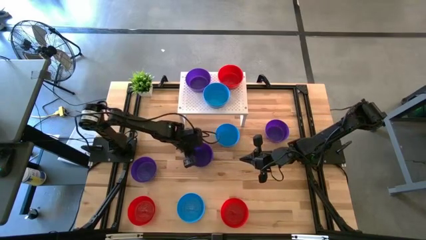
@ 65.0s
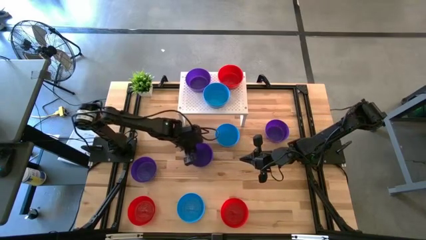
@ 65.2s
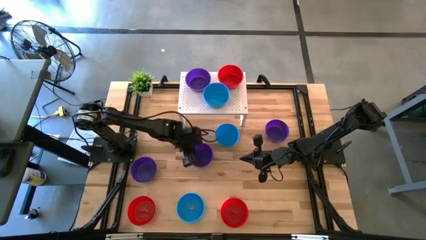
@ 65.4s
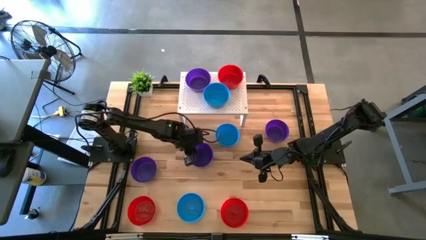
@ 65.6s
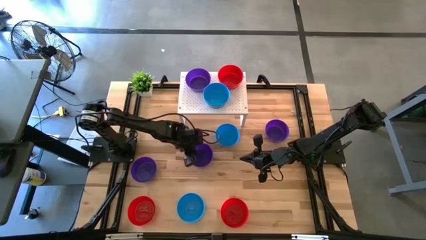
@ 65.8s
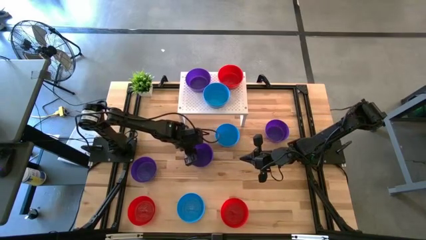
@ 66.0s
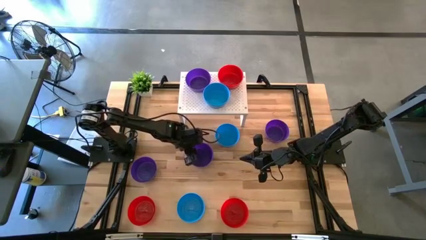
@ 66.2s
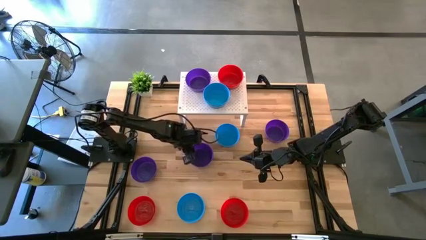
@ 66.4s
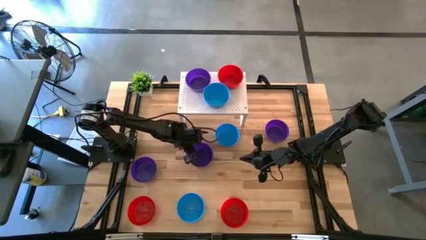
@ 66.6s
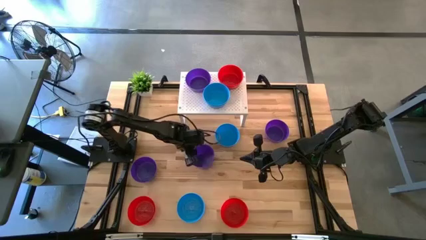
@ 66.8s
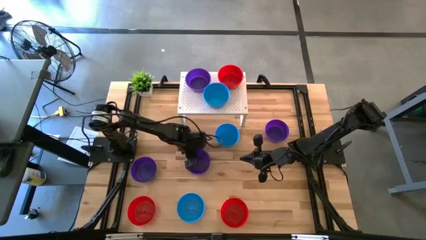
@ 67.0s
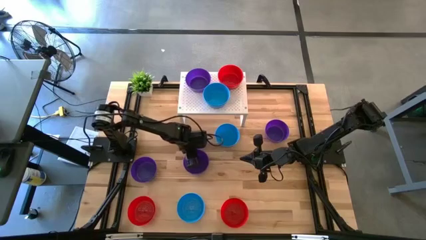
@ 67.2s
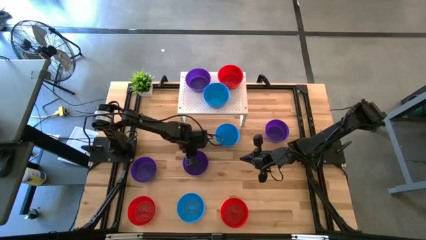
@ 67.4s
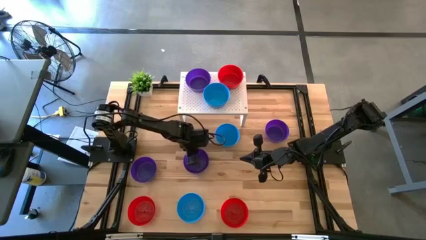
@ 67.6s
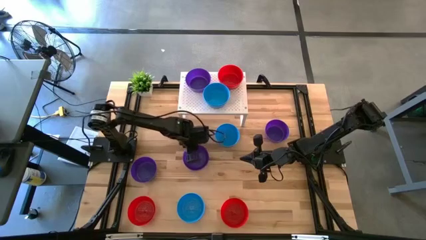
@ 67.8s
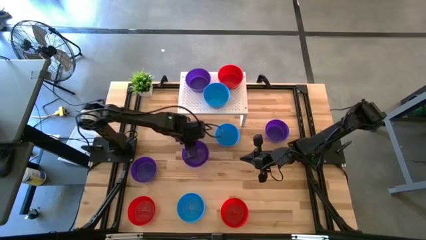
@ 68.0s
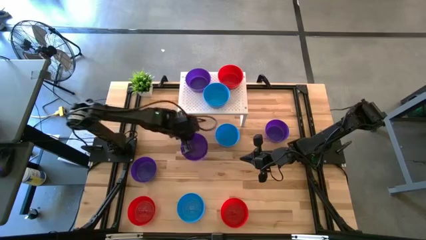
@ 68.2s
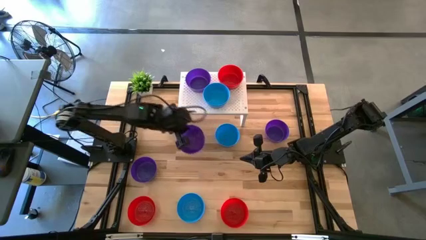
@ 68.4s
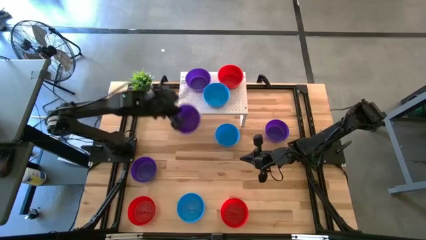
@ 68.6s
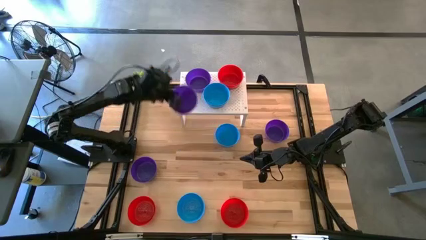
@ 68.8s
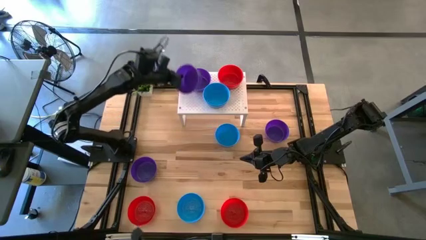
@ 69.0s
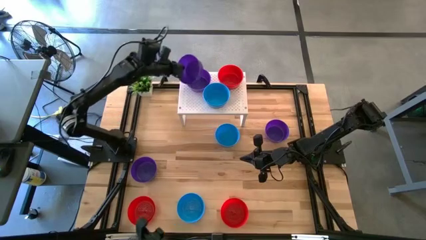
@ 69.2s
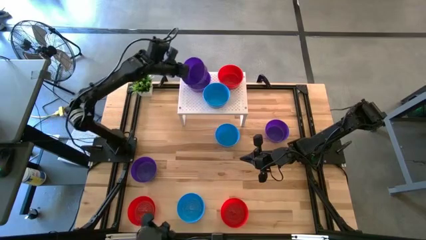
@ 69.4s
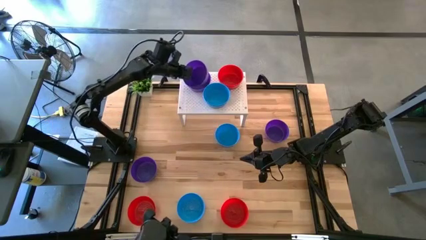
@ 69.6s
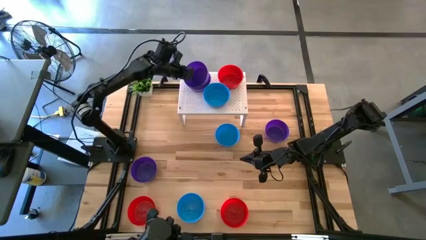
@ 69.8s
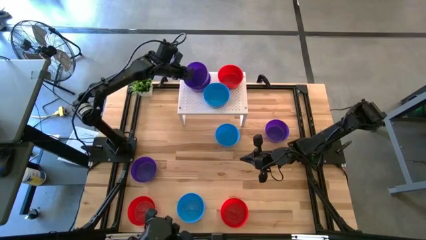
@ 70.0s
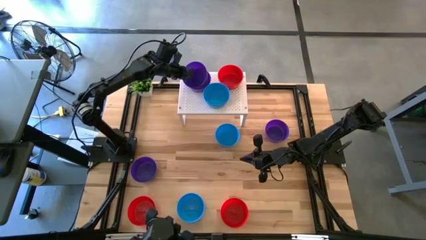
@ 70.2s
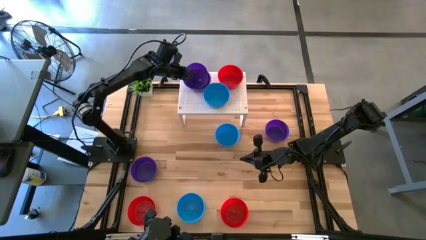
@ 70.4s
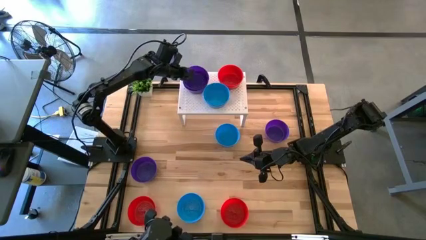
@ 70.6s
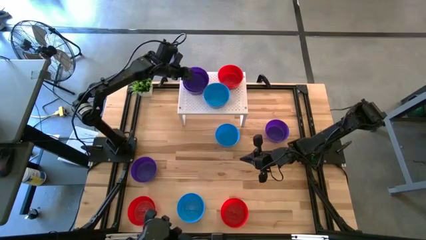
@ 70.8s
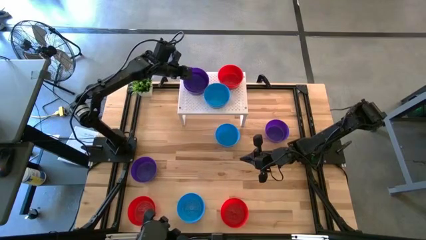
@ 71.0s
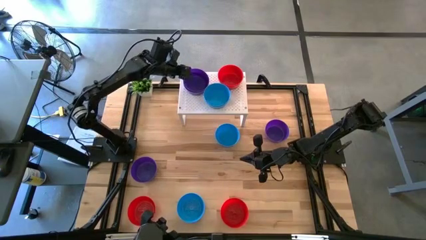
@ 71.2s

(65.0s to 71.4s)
Task: Pick & Place Mini bowls
Stack the purple bowl on the purple bowl on the shelf

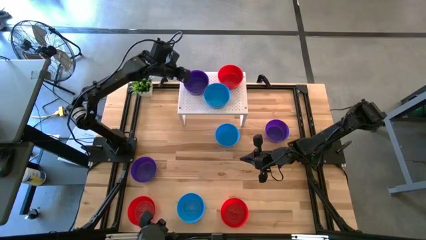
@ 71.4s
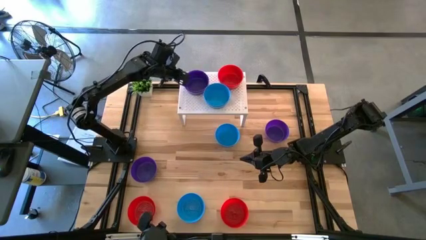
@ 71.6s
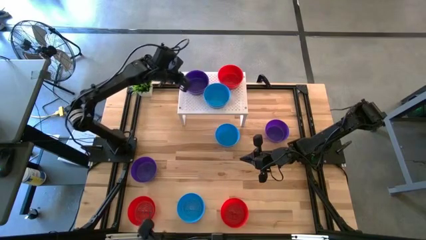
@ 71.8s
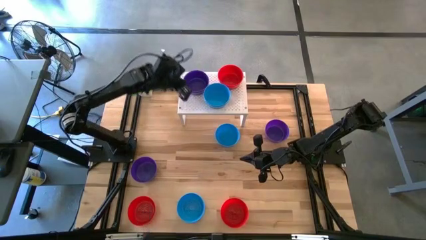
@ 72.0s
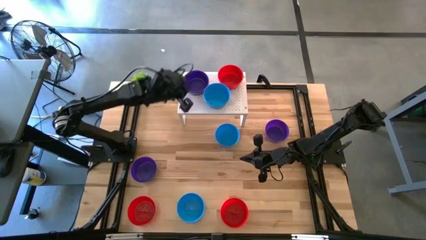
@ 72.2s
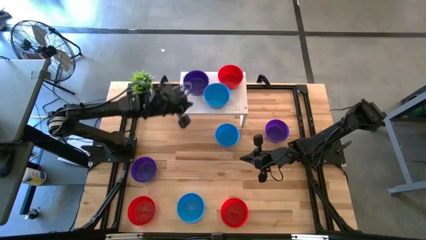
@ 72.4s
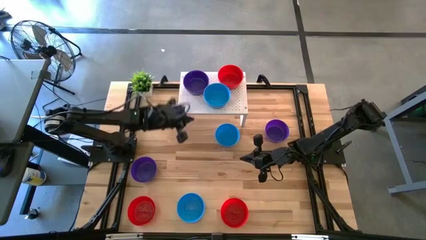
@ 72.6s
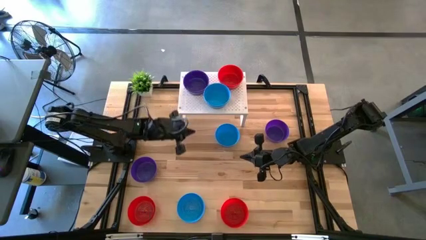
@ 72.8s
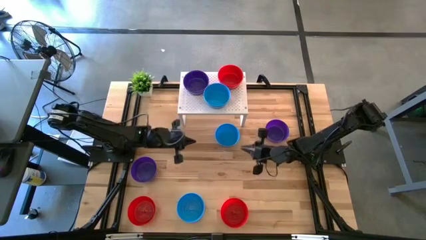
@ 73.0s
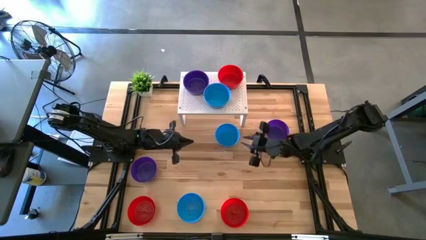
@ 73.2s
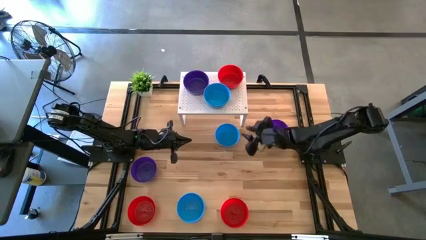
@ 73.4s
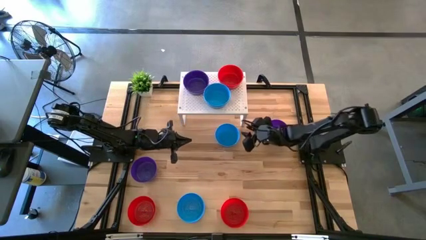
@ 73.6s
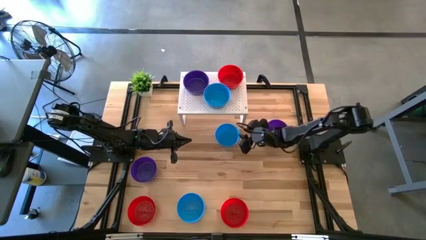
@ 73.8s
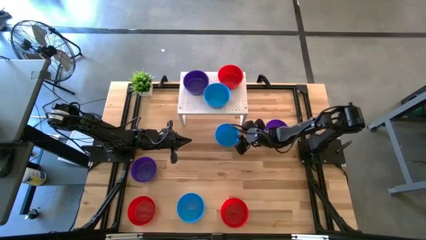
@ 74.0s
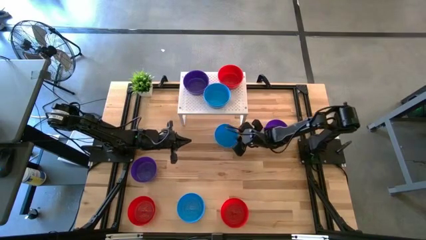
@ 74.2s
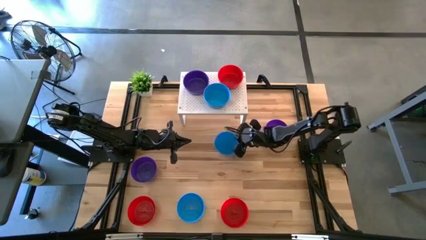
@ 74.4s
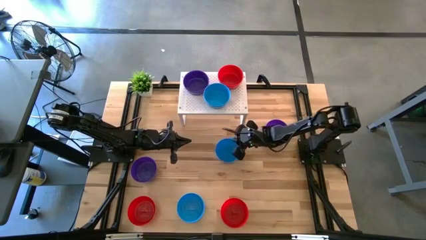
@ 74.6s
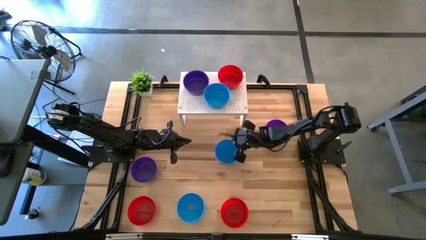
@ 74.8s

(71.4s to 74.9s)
Stack the blue bowl on the blue bowl on the shelf

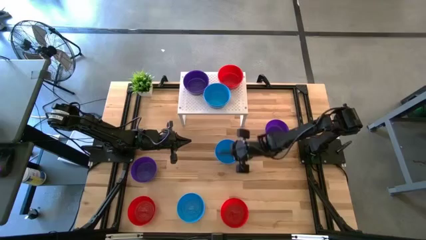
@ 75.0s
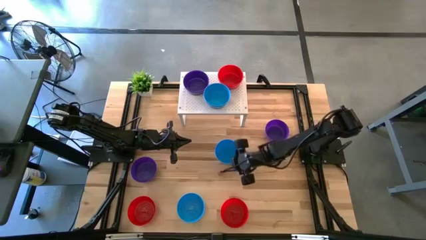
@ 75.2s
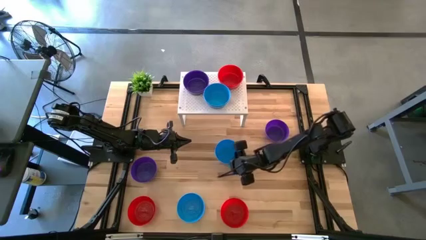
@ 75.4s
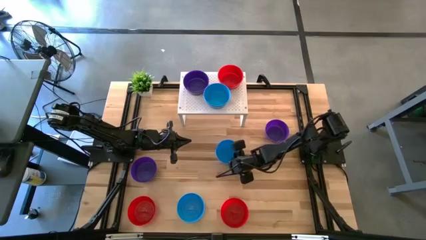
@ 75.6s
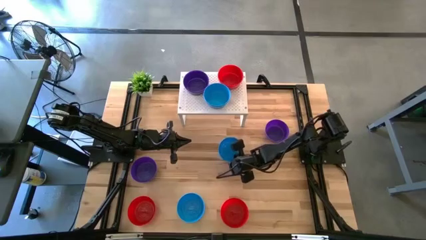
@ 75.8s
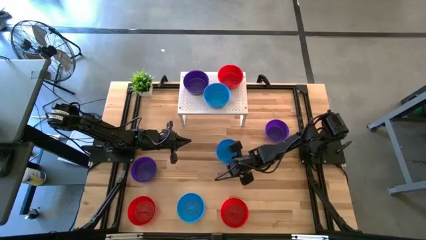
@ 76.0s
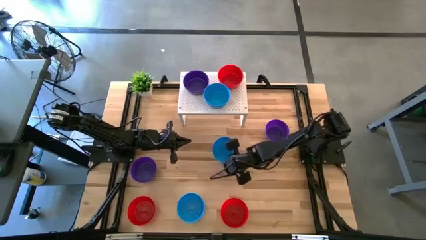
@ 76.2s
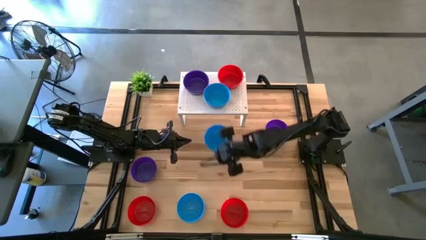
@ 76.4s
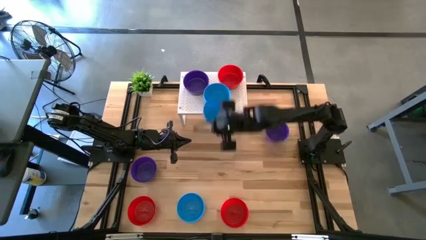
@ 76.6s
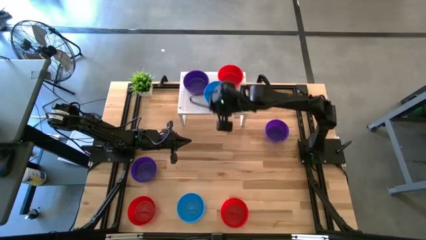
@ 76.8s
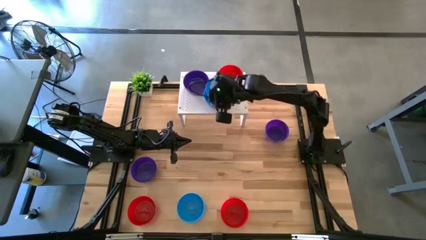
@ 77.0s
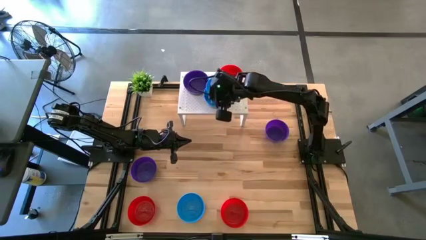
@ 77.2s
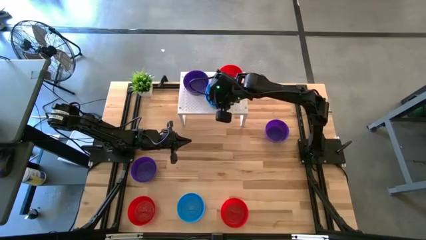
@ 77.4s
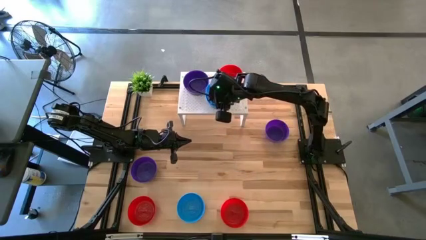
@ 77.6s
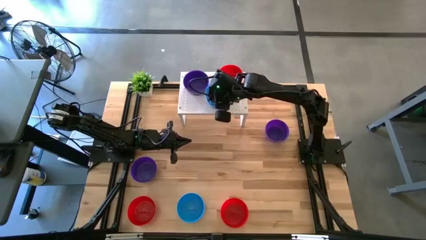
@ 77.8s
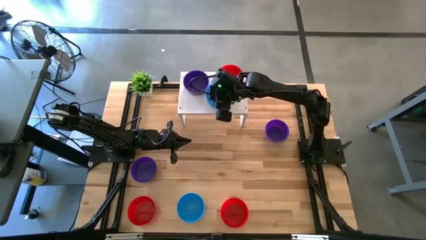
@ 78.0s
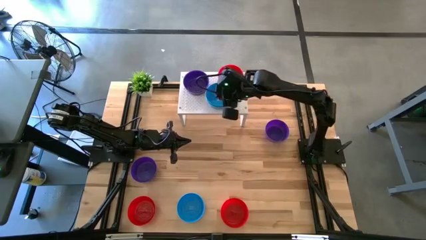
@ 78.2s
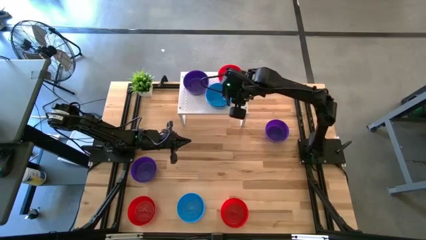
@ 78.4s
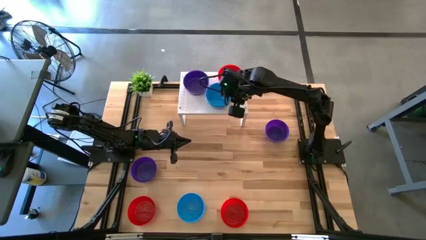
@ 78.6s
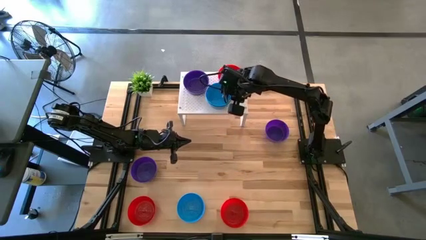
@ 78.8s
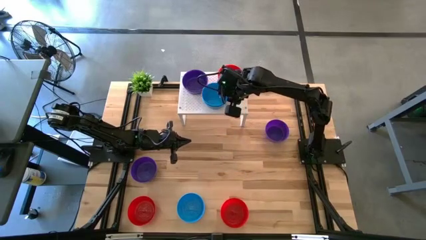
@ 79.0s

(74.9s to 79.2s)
Stack the blue bowl on the blue bowl on the shelf

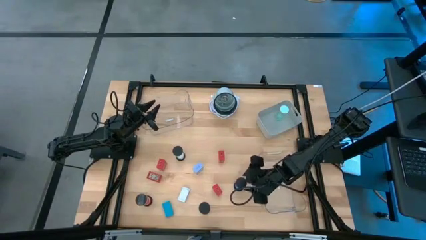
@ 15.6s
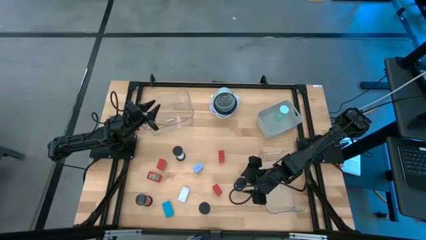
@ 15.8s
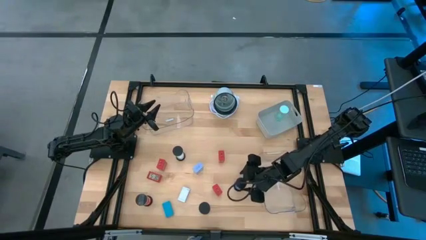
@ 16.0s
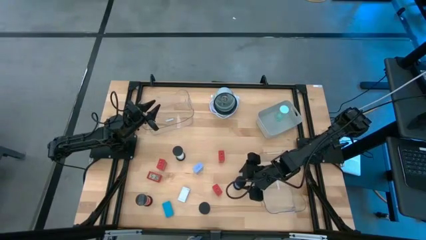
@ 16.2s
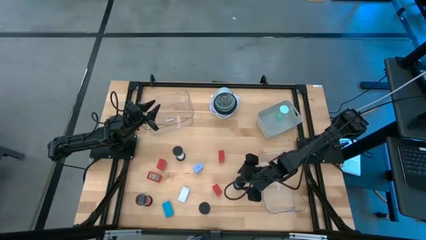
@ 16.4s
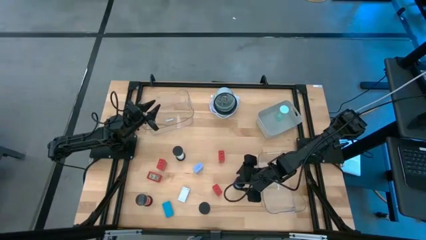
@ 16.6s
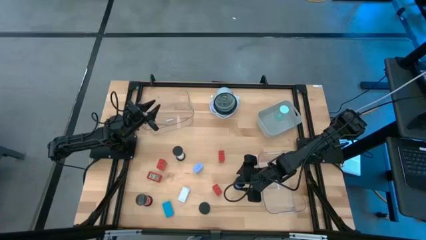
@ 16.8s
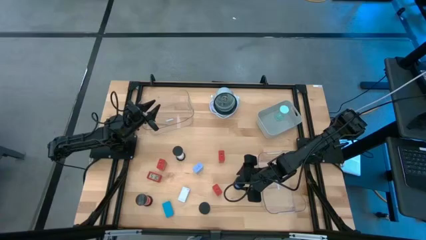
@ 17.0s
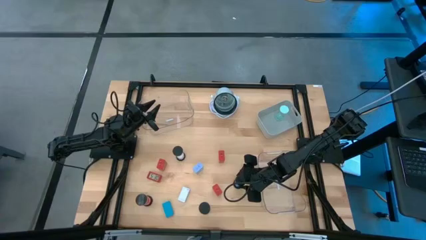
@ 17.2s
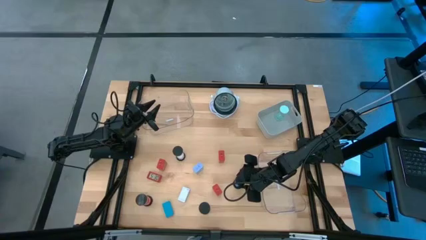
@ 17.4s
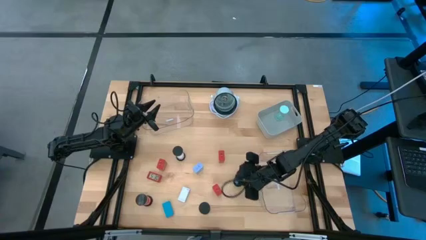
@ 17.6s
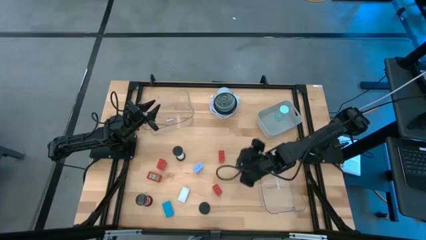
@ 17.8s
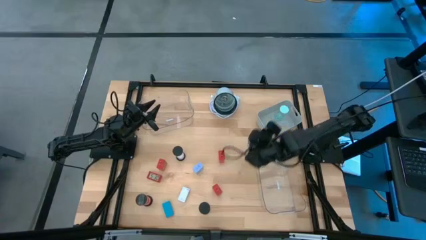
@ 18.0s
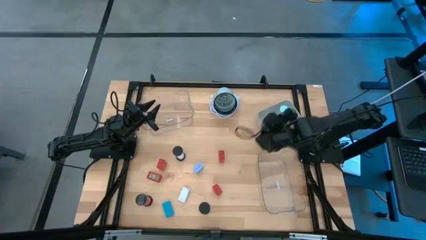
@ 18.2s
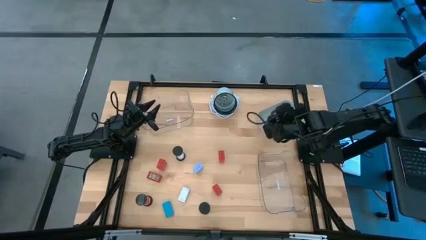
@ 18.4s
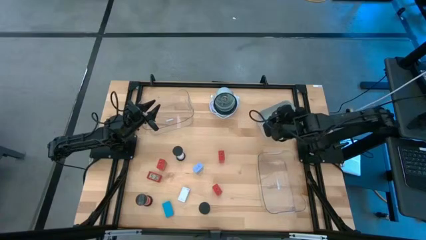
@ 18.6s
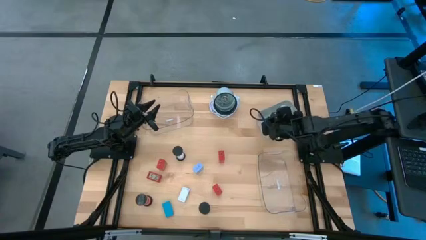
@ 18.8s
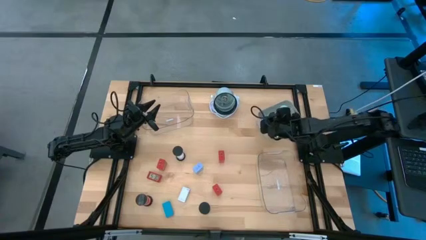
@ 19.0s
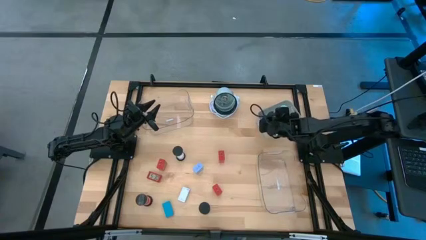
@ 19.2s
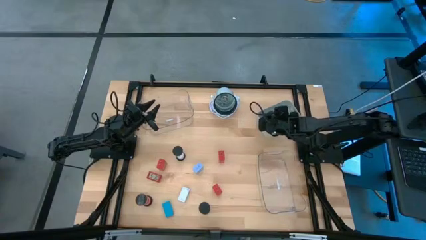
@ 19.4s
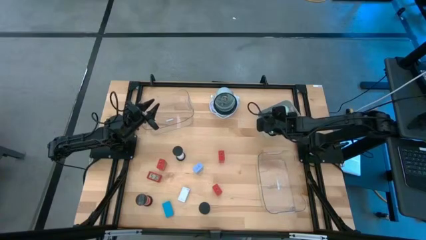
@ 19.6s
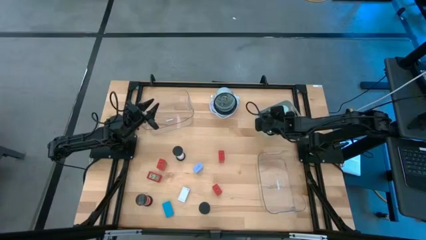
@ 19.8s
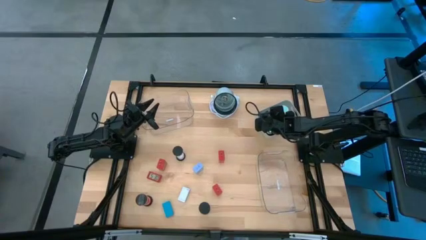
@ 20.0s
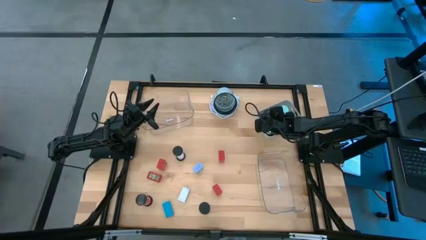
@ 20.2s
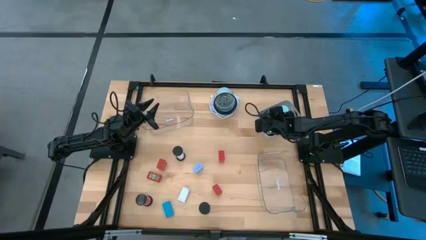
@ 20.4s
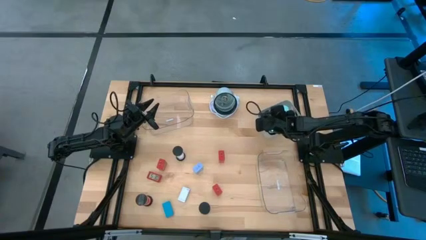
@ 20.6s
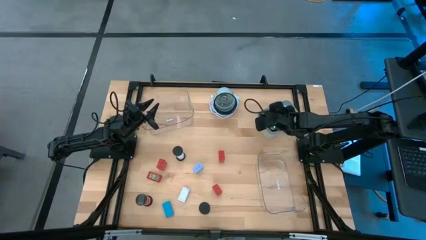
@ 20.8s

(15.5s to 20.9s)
Task: Pick & Place Office items
Put the right blue hourglass into the gray bin
